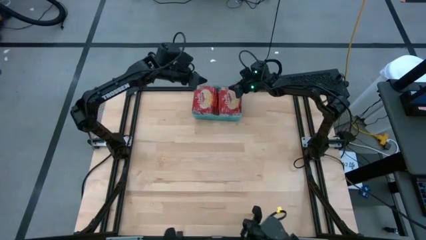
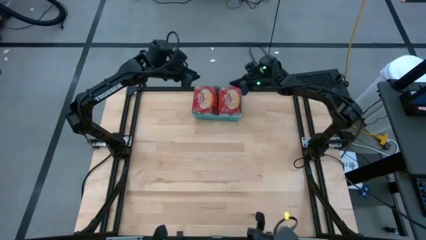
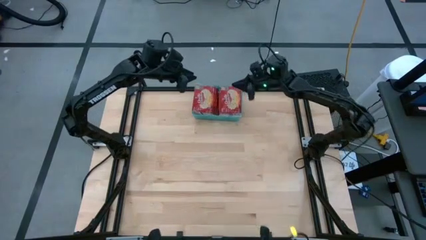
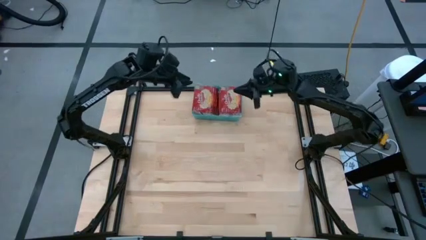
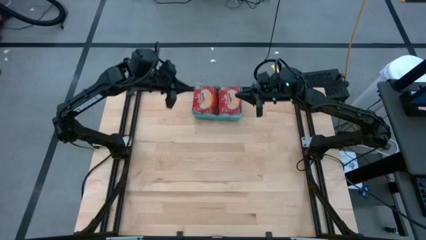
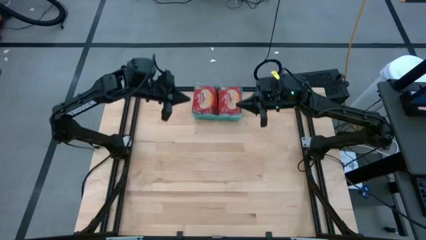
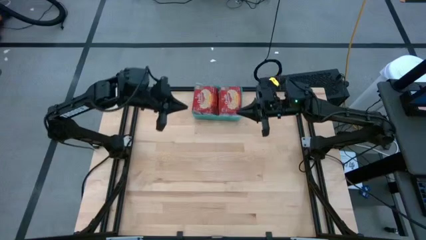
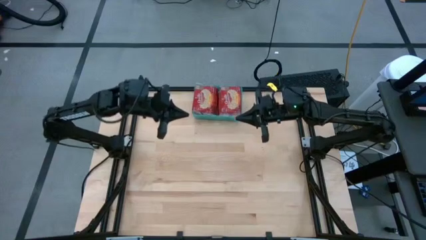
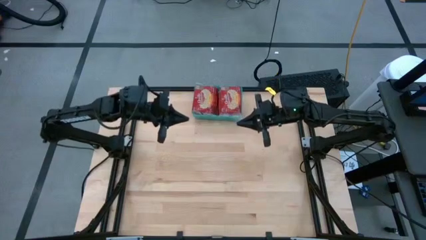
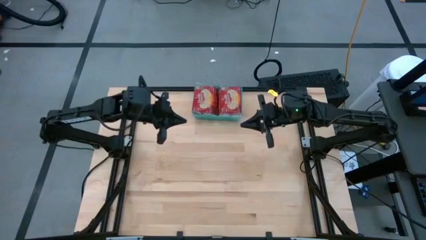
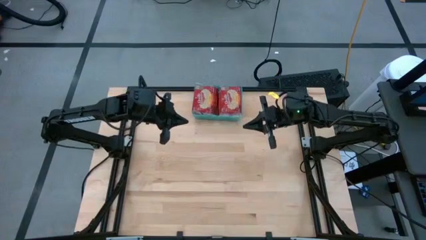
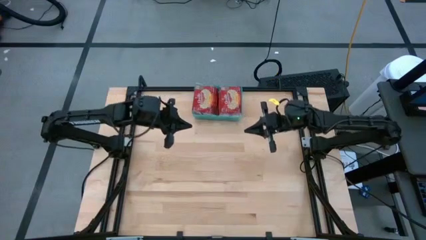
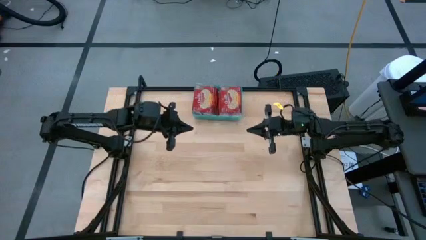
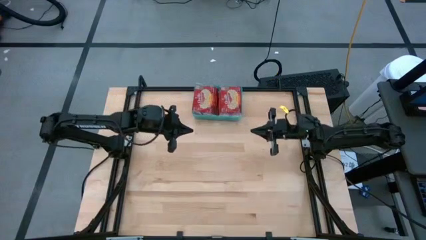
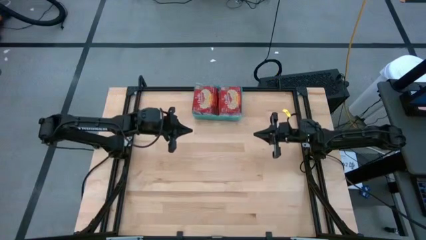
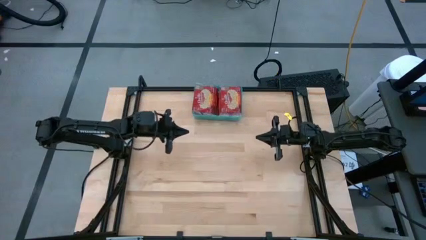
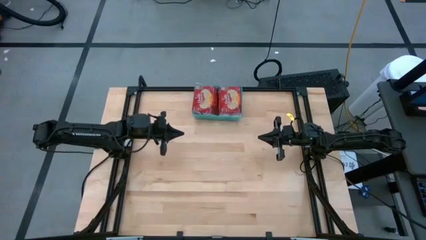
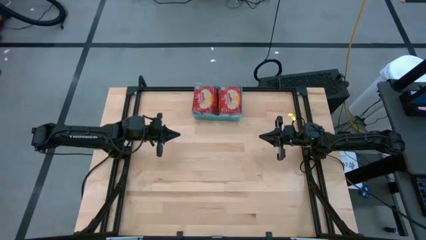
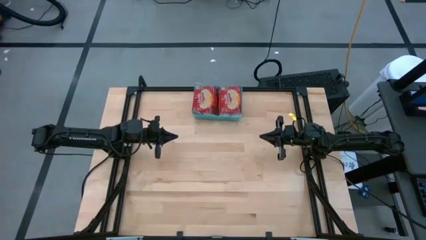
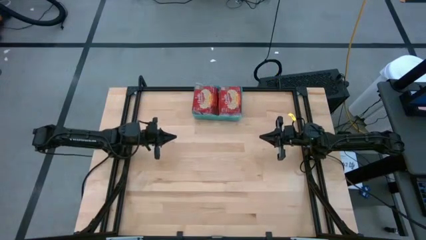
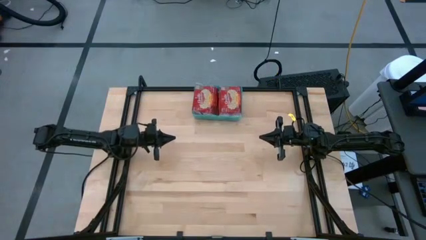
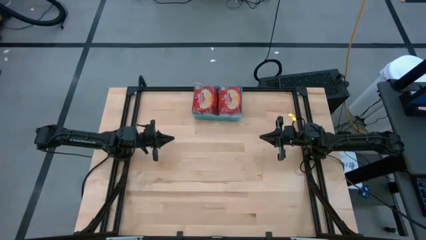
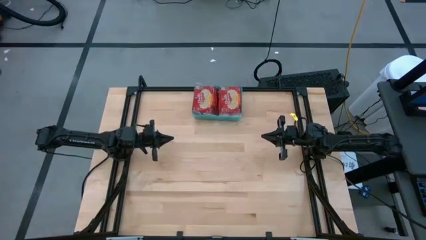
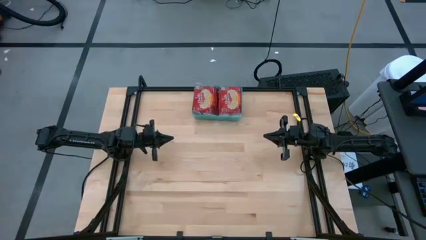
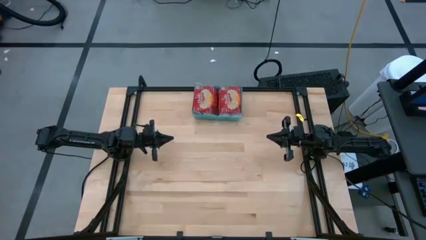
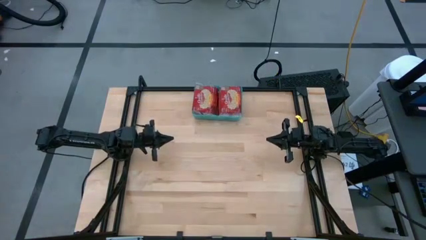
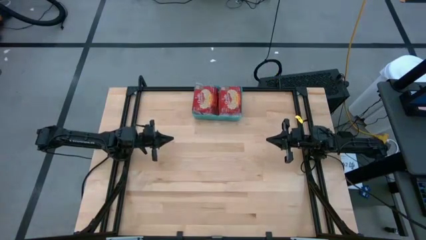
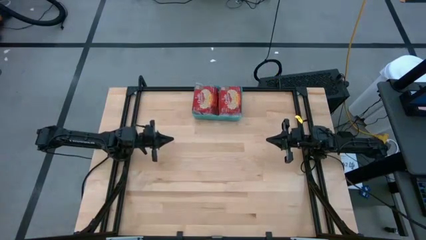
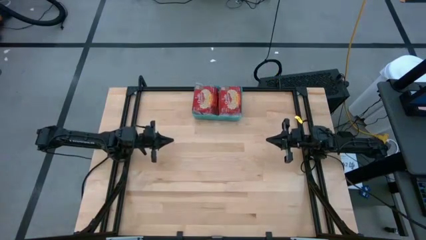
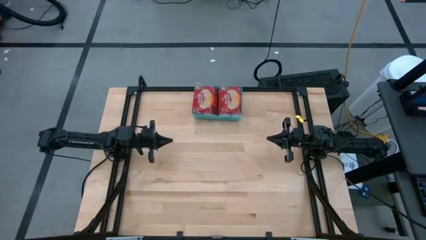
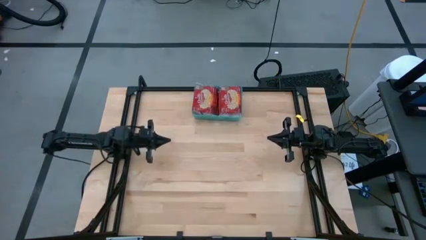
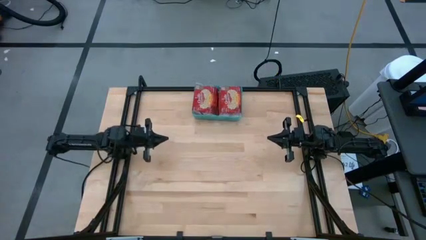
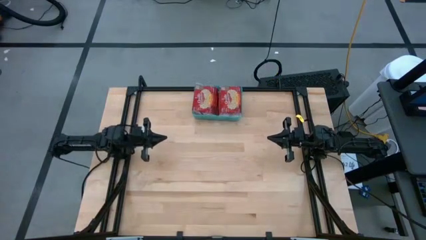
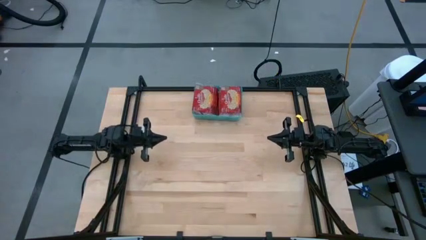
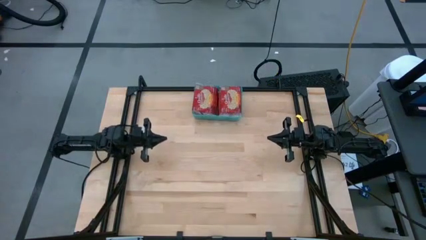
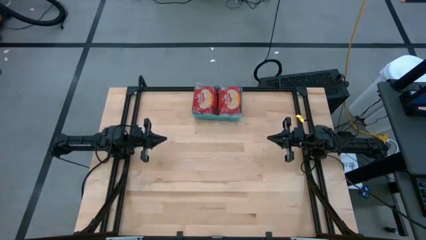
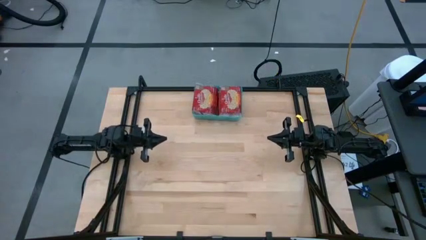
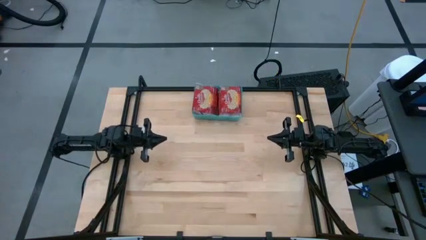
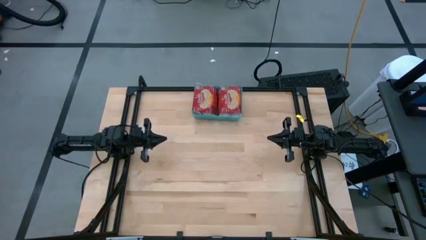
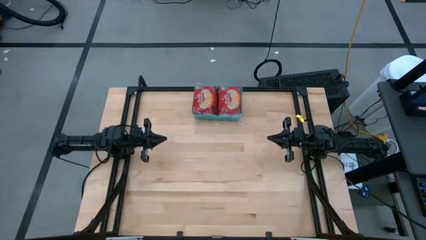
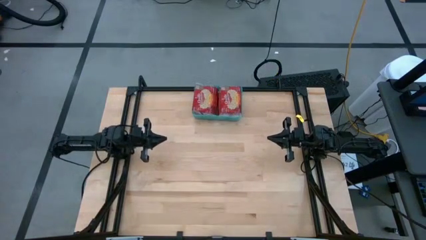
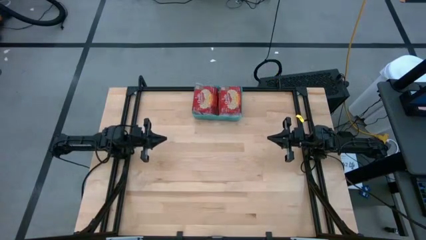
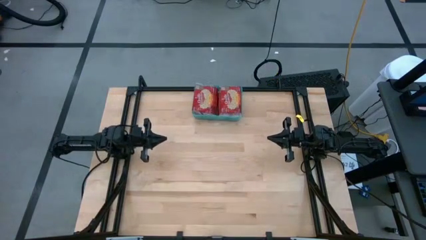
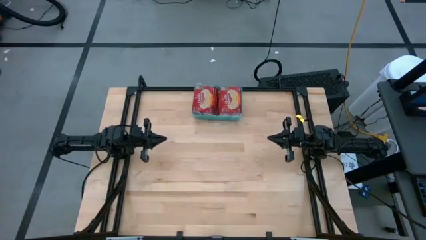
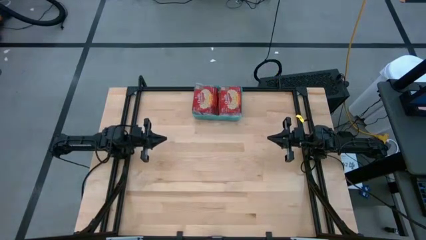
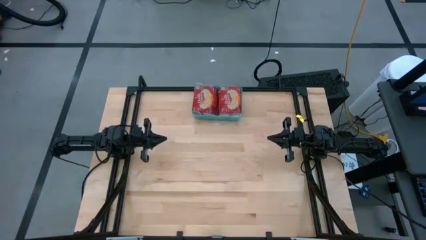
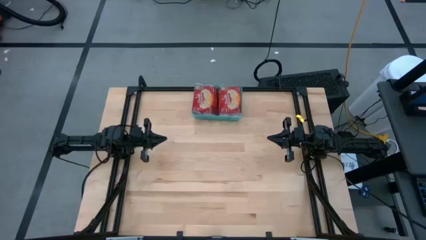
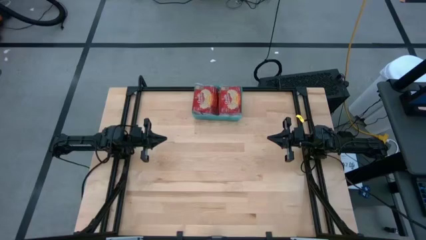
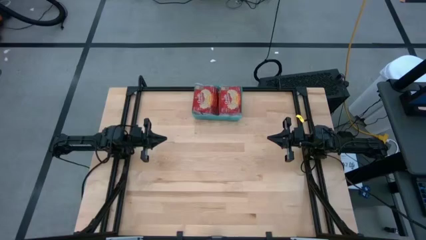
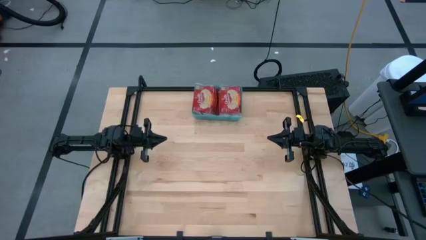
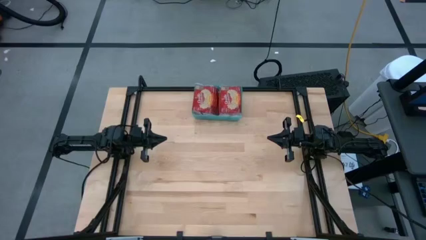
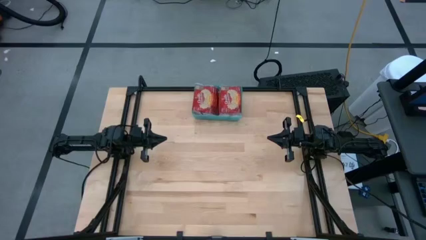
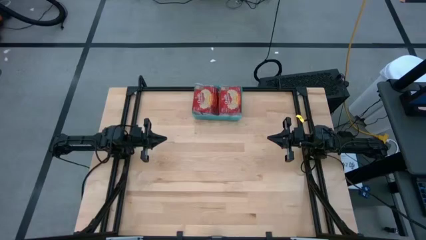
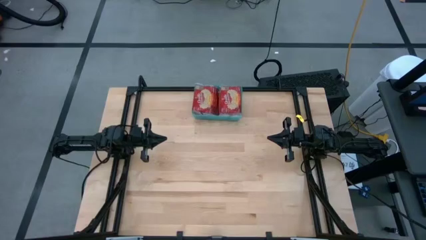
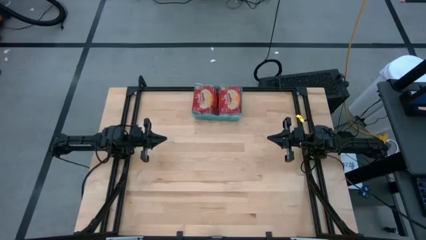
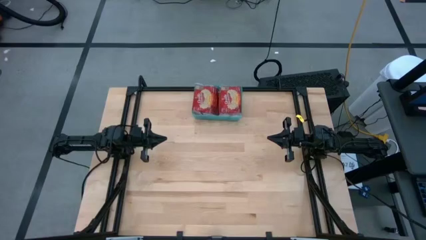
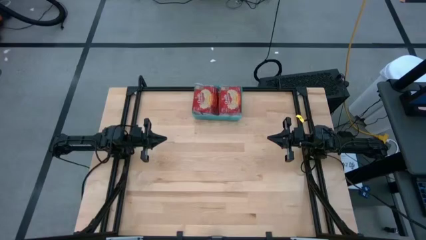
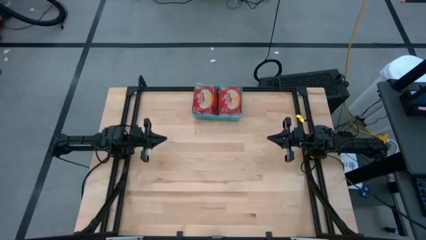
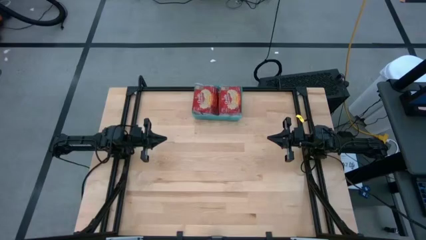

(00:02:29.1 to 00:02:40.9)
Task: Sort popcorn bags into baskets
Return to Home Position
